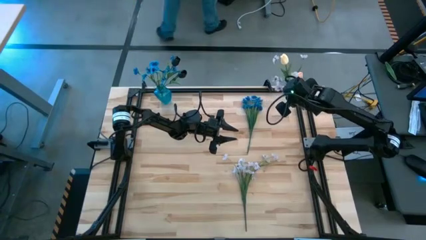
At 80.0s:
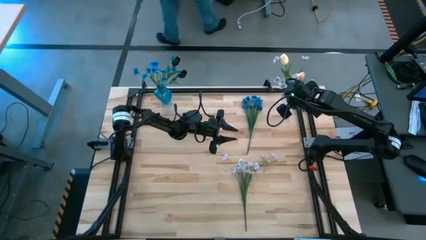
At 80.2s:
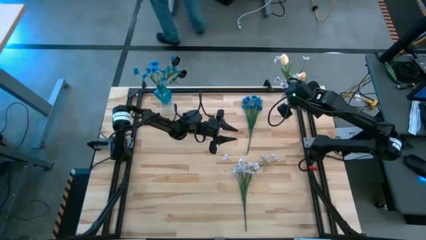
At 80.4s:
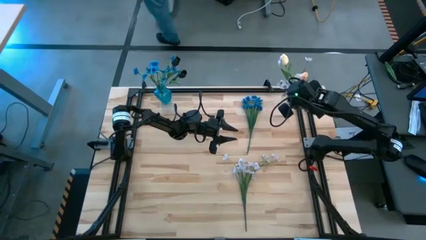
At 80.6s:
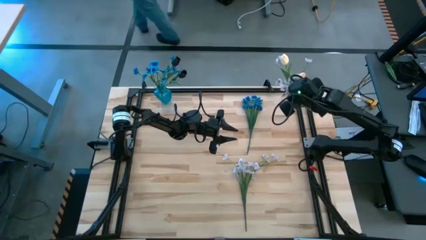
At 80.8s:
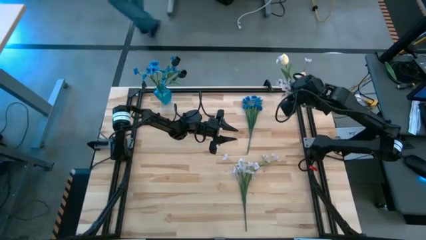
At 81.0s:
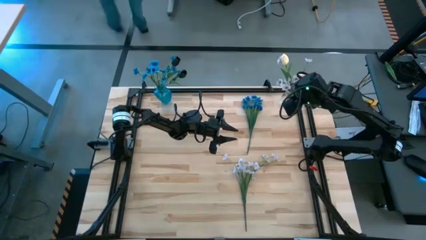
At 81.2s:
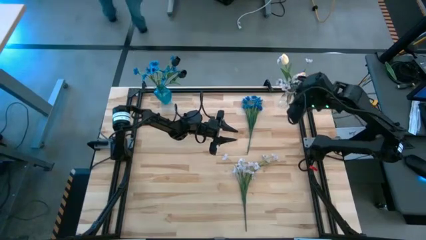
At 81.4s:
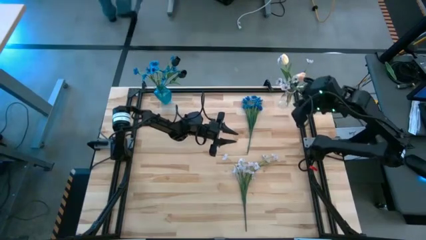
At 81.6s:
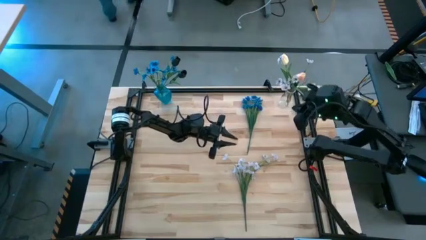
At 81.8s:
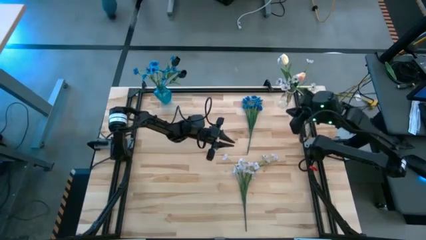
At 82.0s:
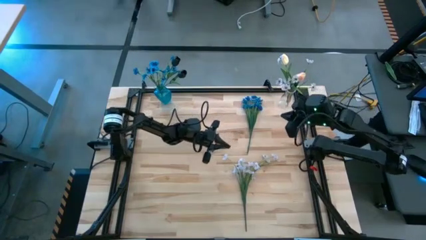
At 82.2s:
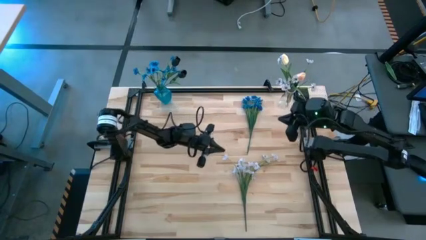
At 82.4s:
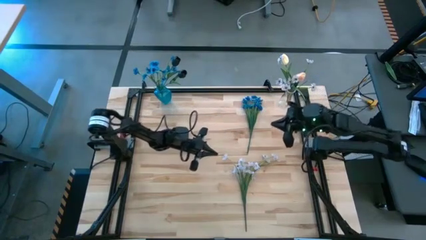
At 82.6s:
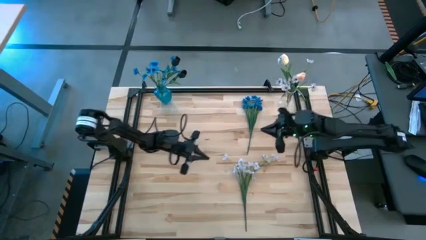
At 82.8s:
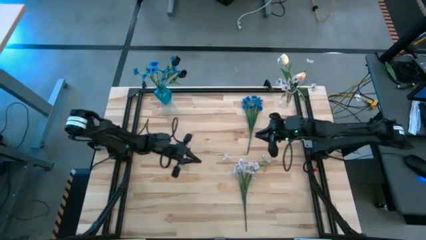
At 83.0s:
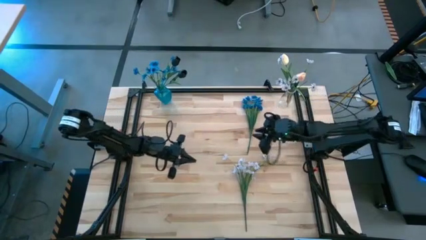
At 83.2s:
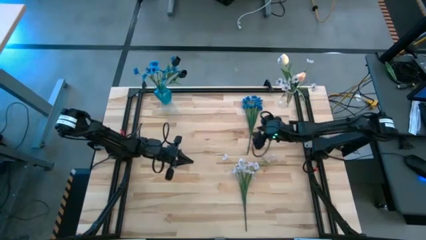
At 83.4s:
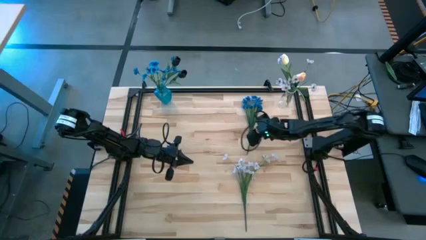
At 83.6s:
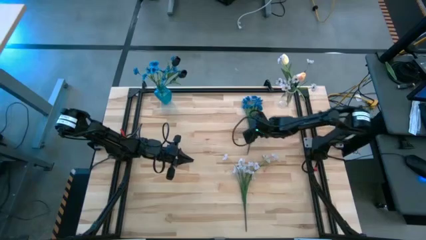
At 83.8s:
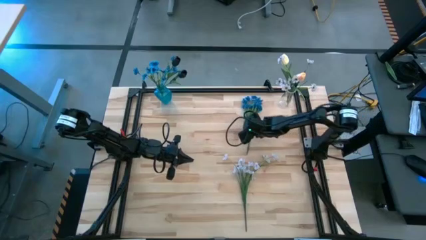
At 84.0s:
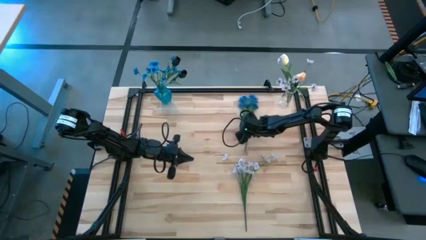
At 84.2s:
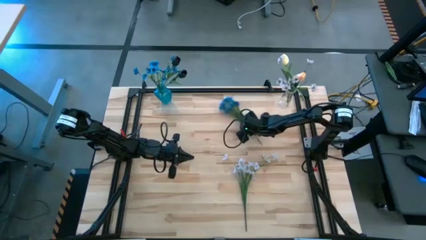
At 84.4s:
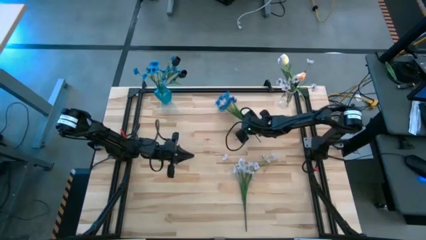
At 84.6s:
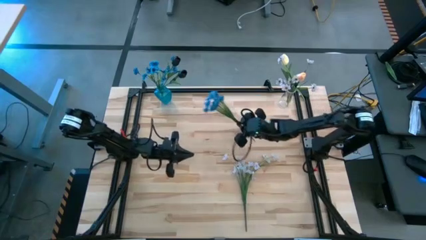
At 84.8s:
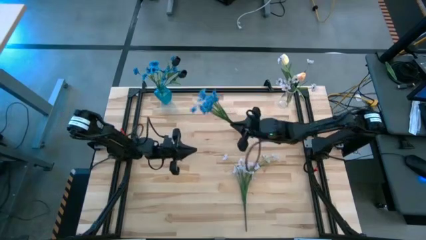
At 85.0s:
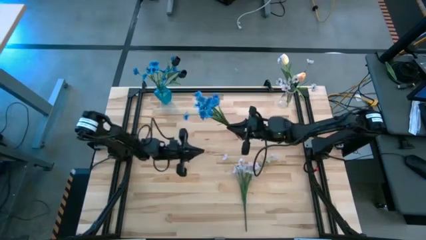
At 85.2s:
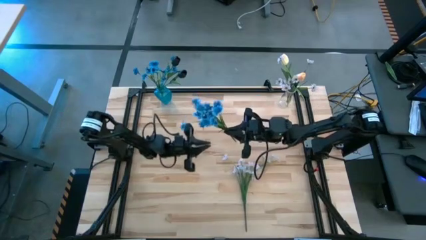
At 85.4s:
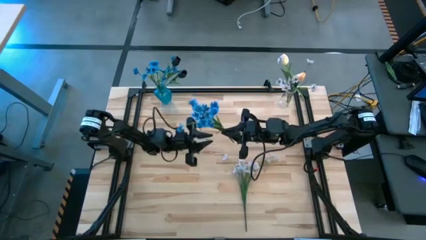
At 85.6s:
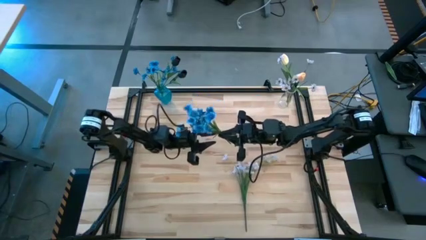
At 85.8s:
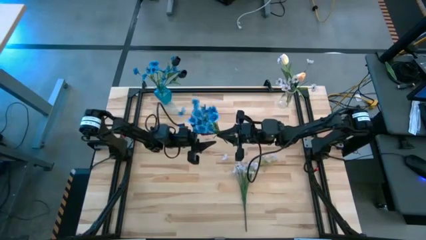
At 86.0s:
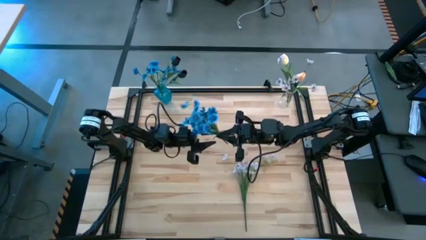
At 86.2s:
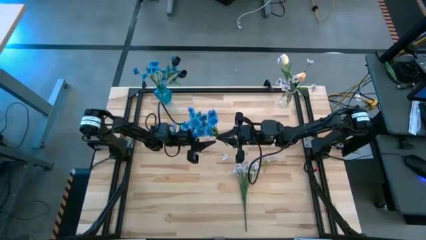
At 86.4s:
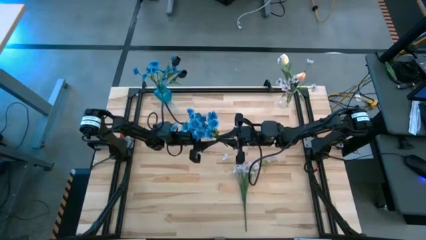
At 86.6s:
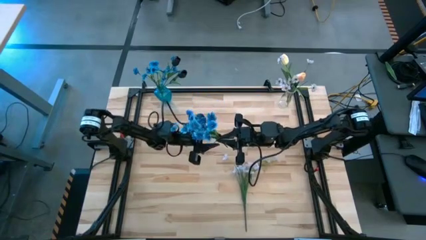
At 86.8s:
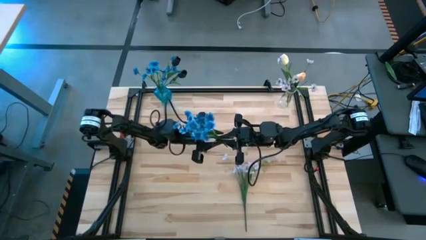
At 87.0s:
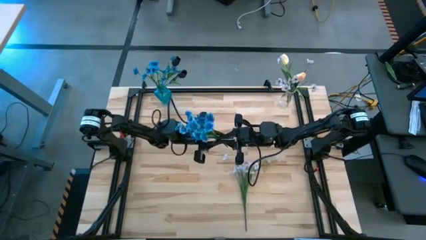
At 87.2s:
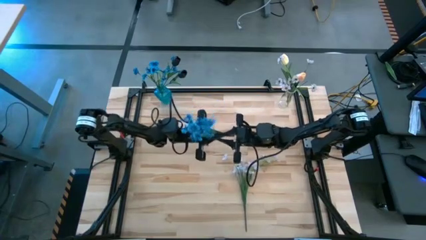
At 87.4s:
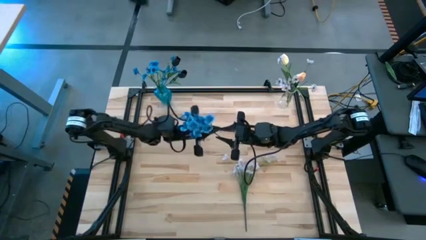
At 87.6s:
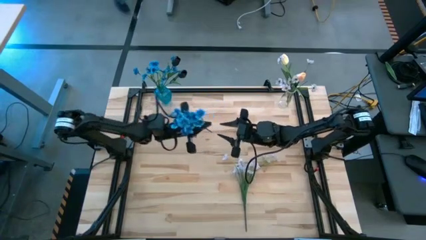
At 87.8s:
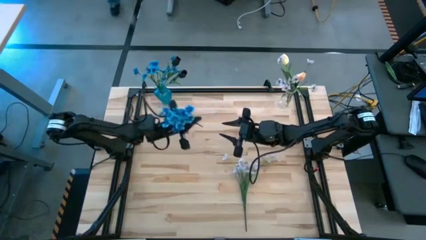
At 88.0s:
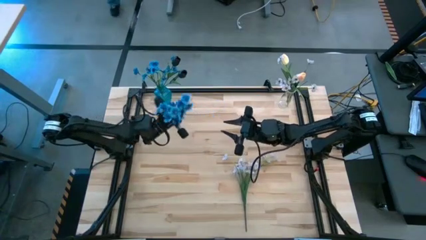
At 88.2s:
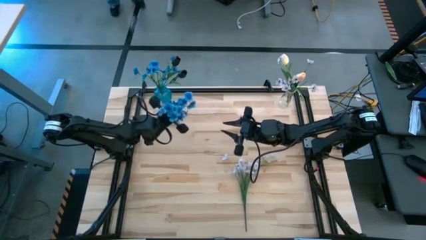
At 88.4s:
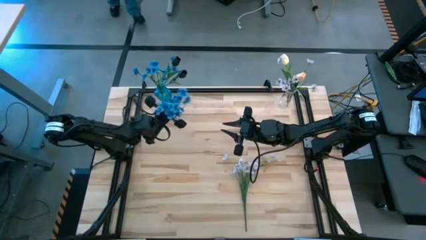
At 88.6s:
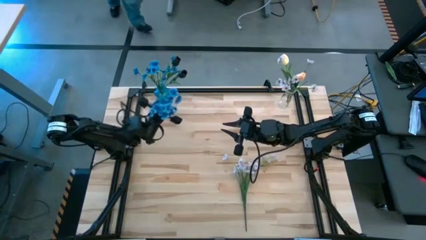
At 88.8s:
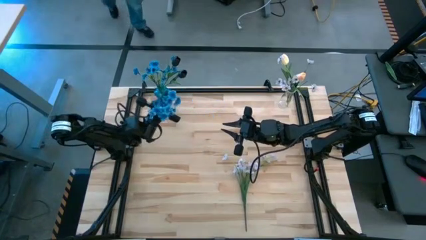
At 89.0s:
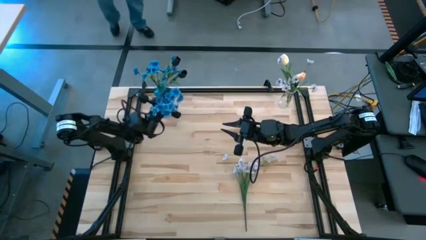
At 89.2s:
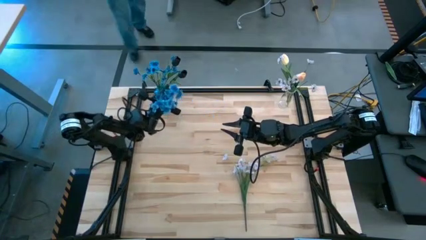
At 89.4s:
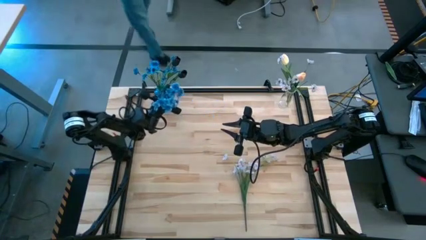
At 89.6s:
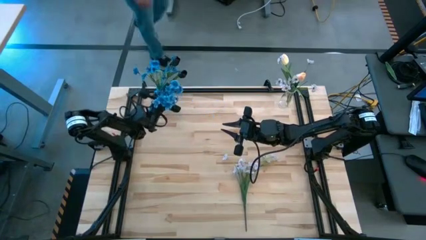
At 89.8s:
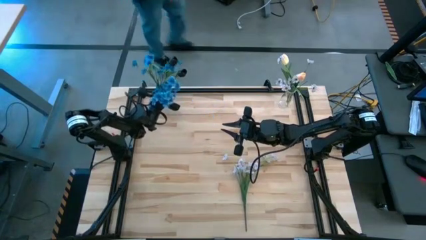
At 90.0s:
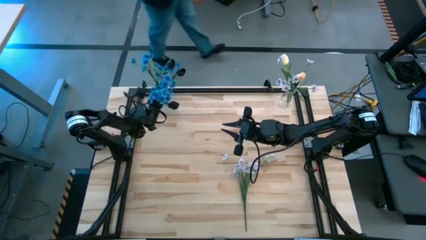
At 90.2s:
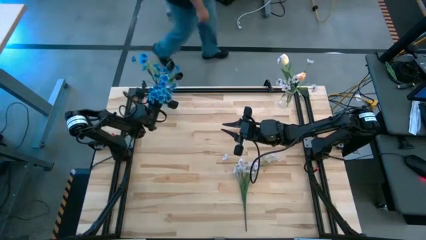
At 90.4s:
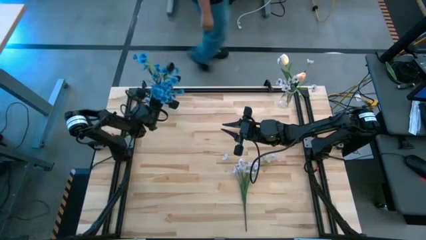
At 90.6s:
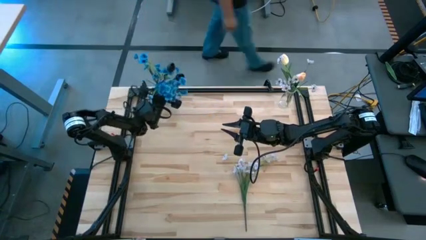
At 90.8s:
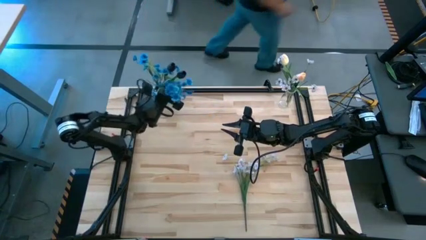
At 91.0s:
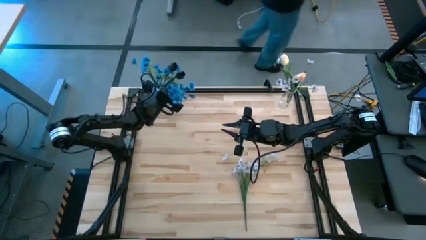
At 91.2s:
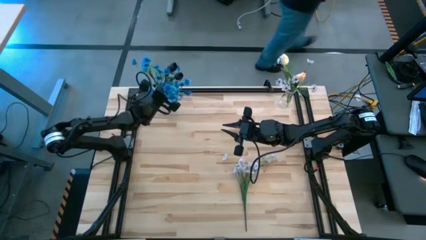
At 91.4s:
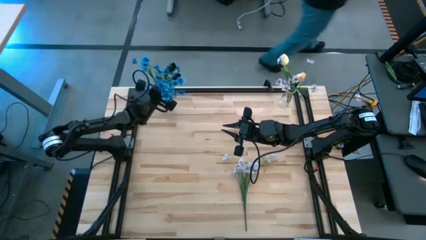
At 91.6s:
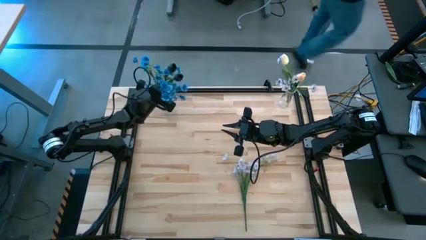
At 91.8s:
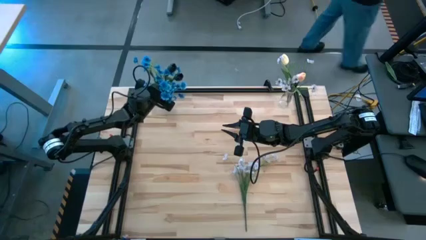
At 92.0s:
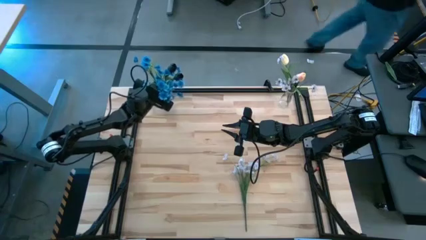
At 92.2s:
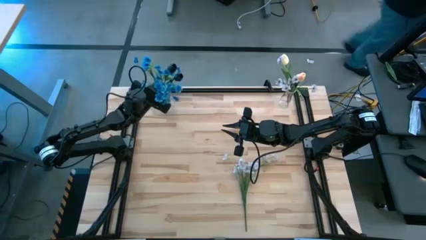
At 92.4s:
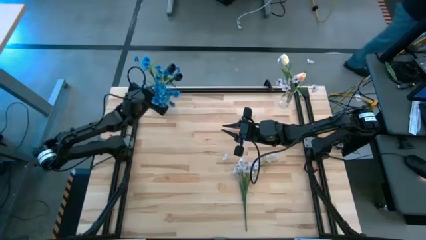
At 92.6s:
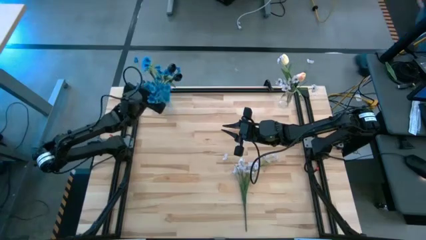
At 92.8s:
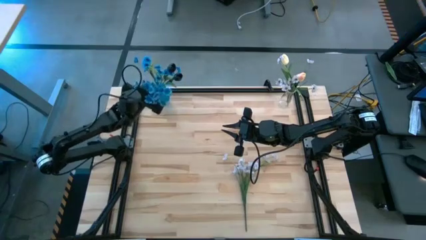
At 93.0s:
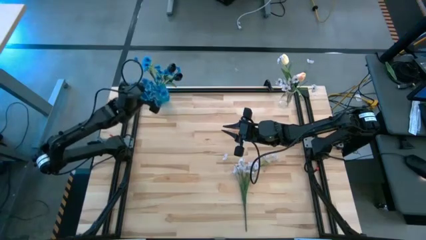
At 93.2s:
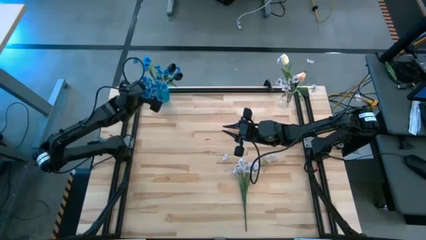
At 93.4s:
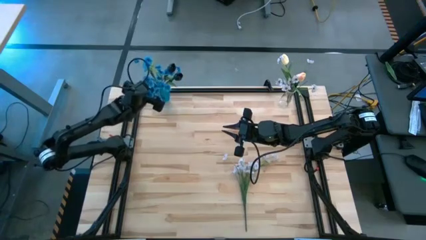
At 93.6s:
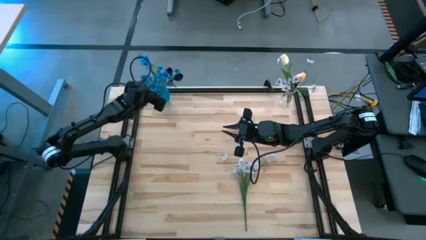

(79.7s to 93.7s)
Task: Sort flowers into vase by color
Put the blue flowers into the blue vase
